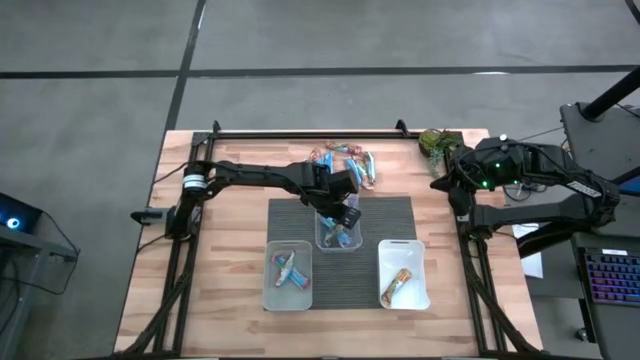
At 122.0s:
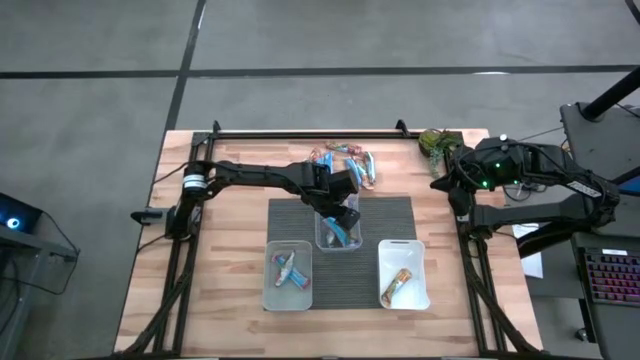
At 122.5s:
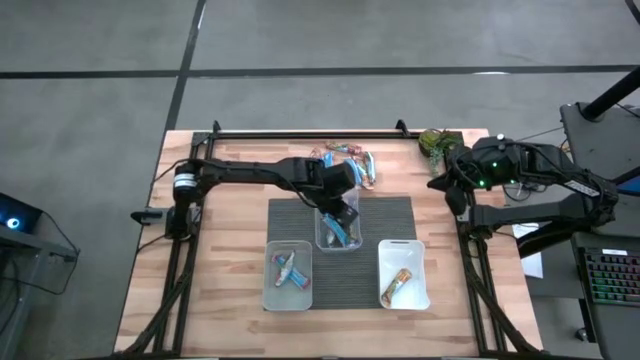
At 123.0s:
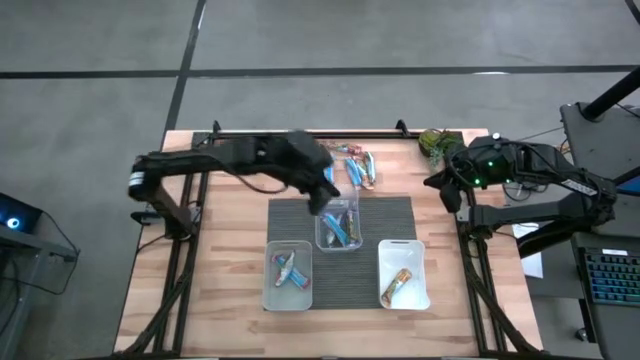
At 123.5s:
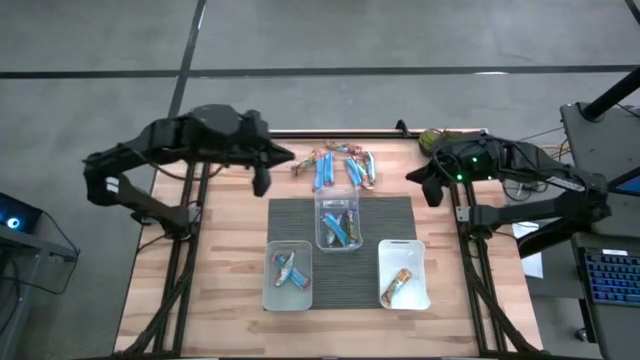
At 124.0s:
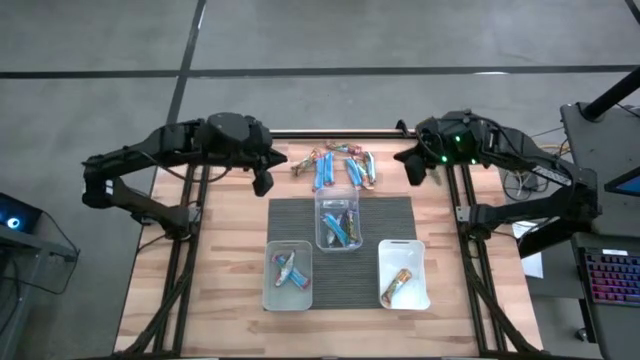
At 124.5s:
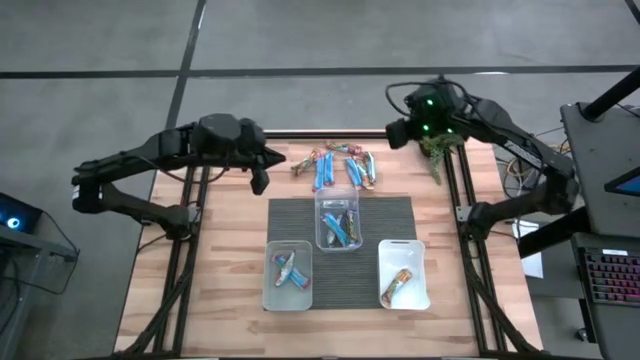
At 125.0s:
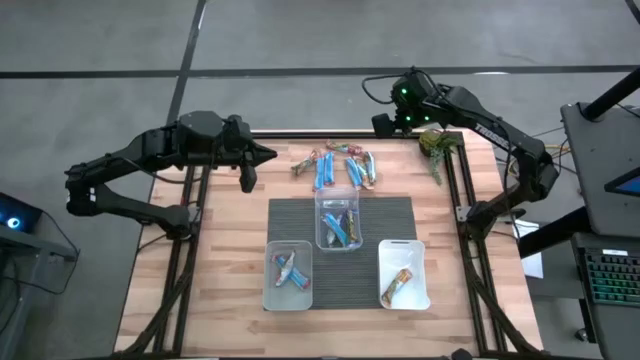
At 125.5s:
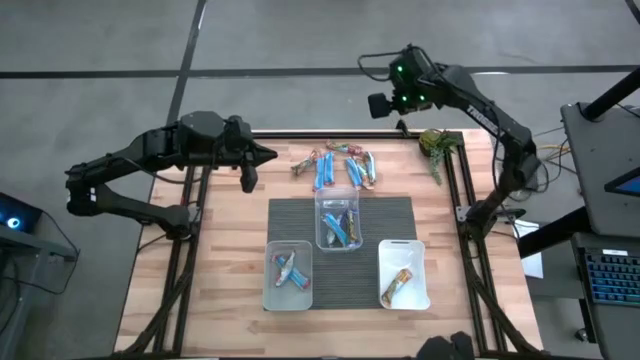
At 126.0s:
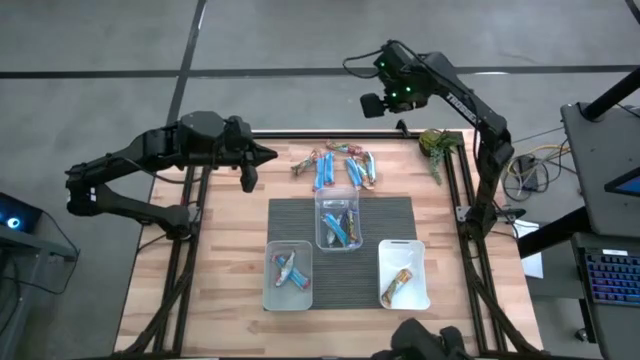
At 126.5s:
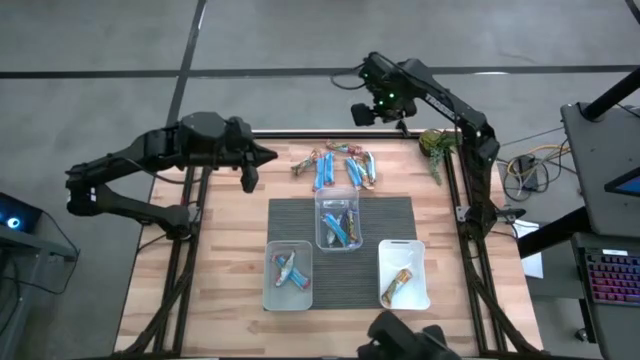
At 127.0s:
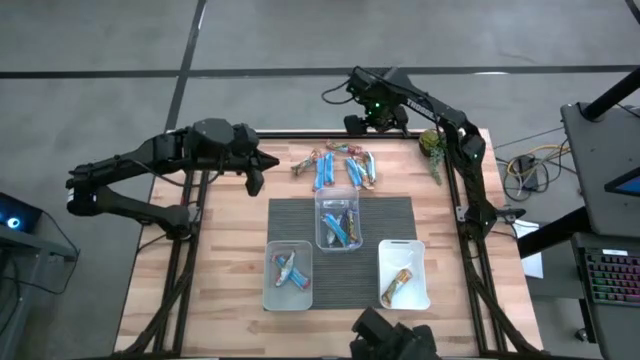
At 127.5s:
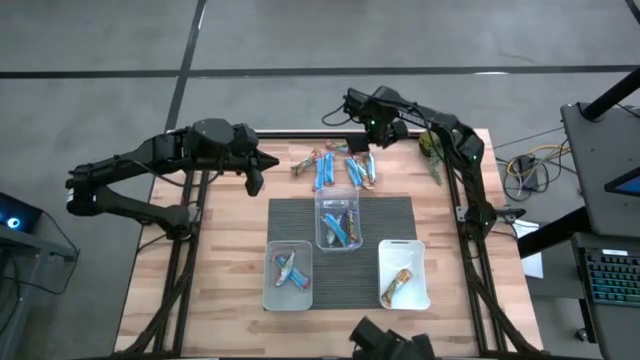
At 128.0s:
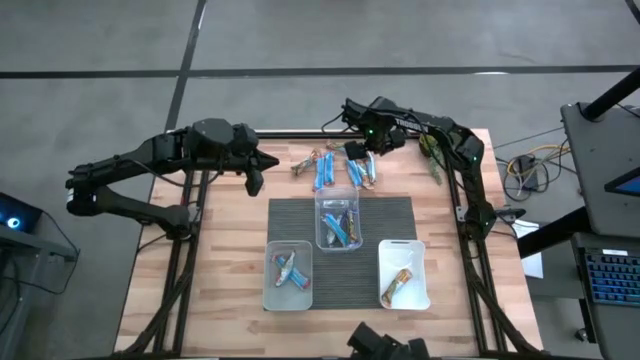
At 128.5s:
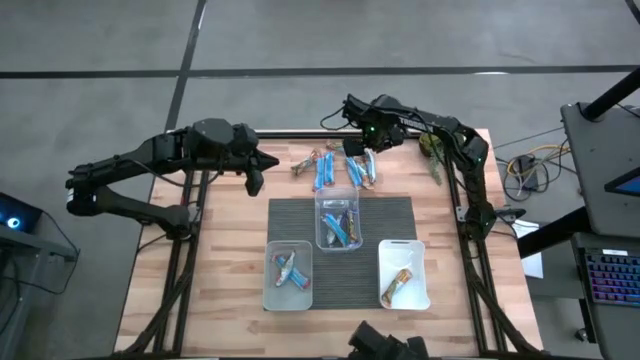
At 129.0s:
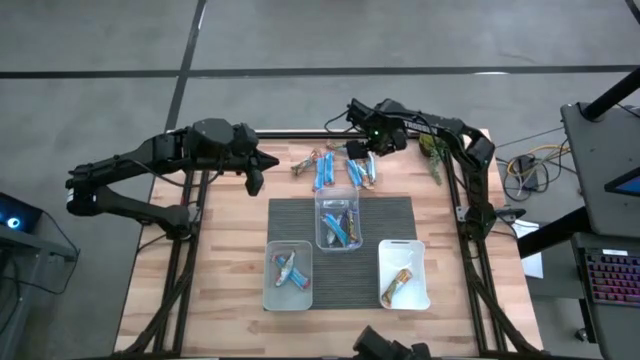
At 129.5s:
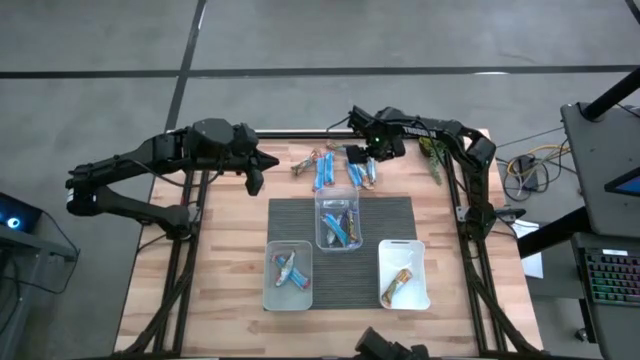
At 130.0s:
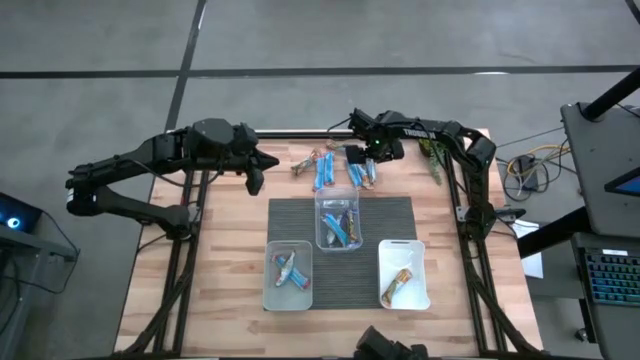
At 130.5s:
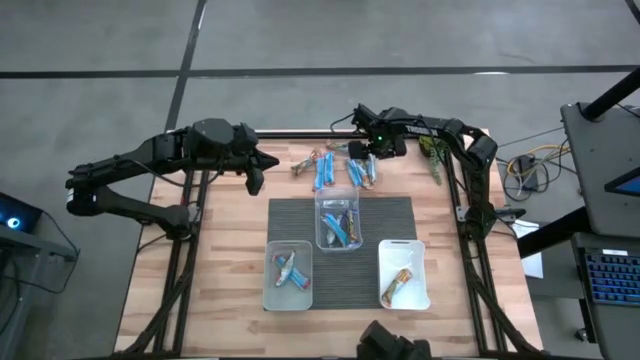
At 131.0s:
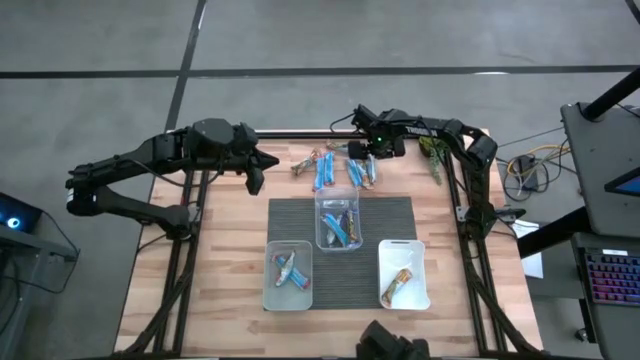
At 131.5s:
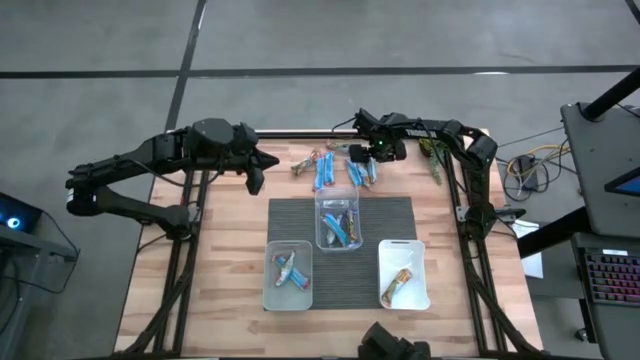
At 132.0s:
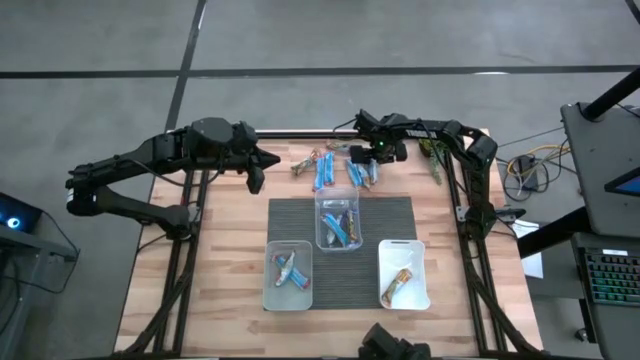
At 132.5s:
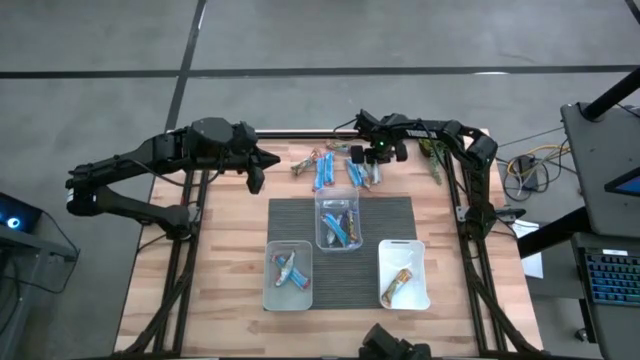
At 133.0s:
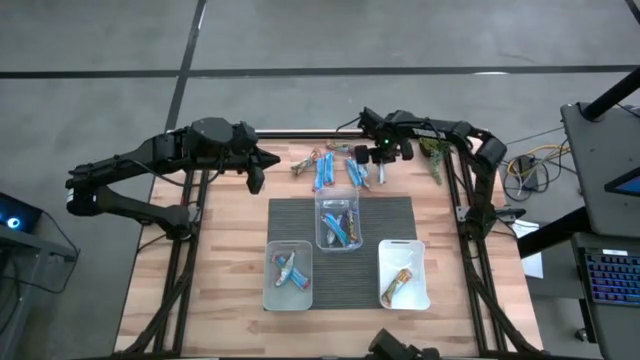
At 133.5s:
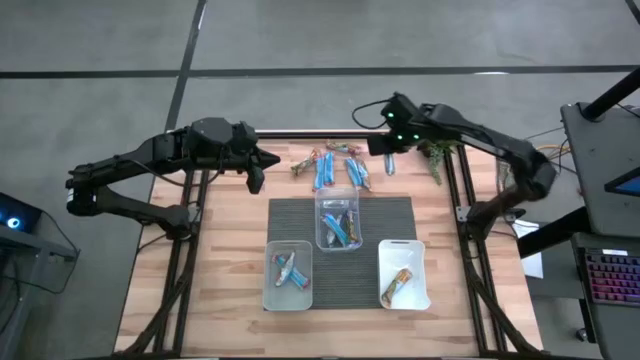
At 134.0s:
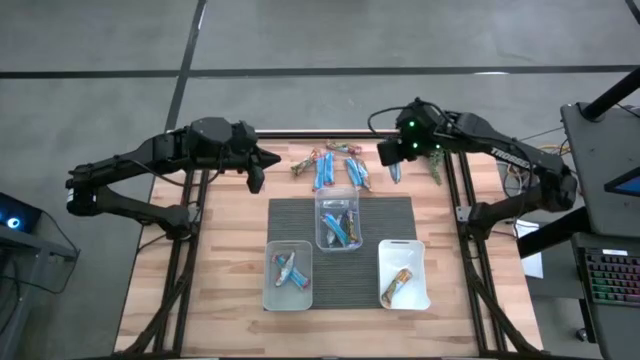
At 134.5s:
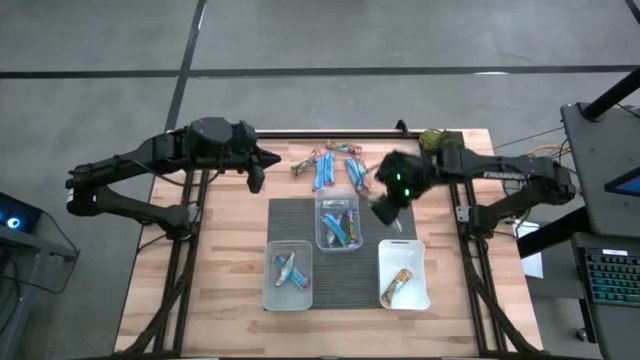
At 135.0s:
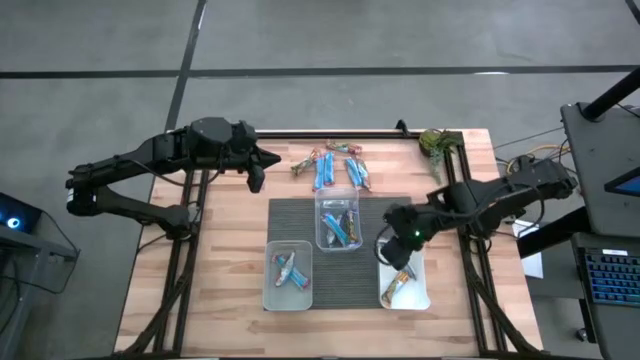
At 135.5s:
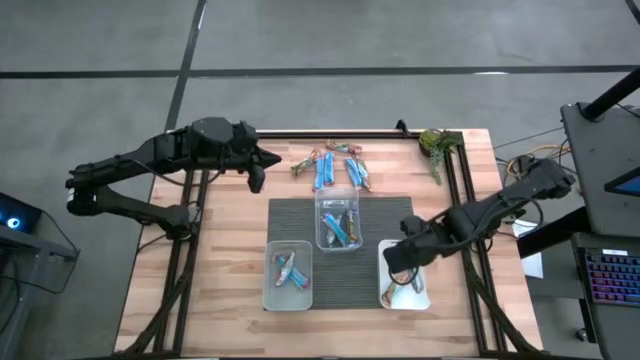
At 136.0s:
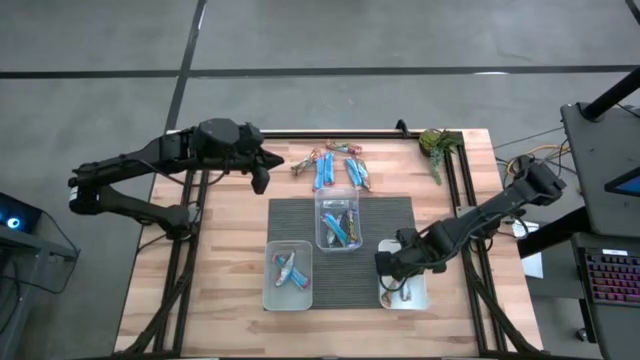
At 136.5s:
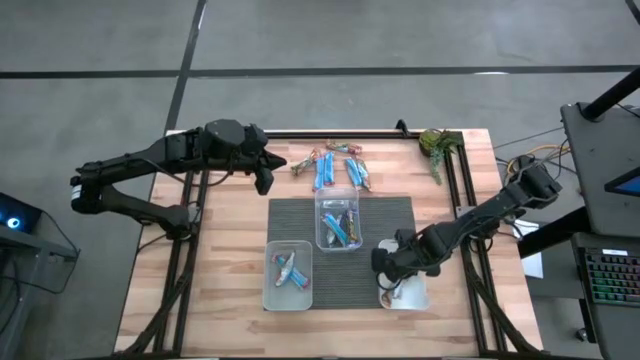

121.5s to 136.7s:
Task: Pick and place Granola Bars by type
Put the orange granola bar into the white bin

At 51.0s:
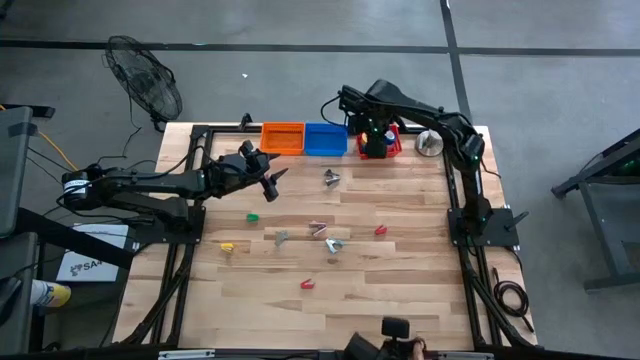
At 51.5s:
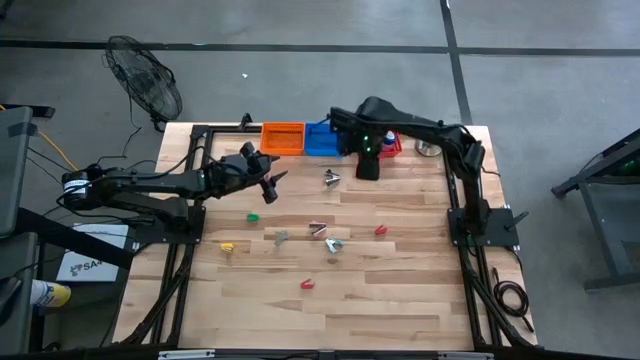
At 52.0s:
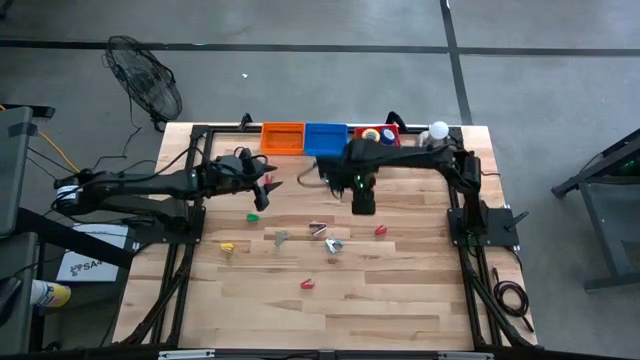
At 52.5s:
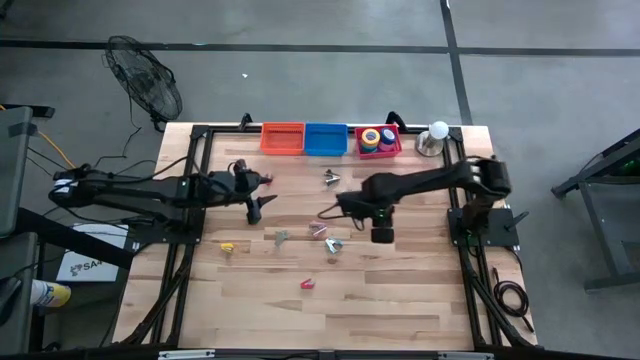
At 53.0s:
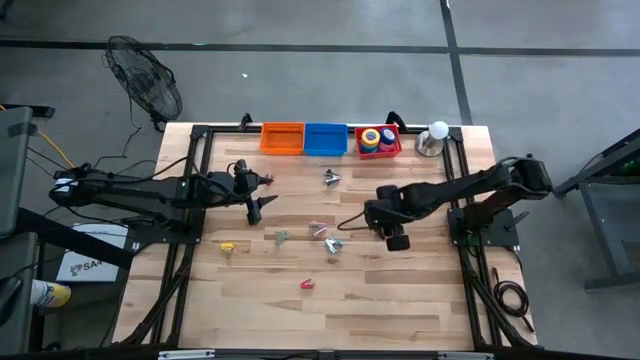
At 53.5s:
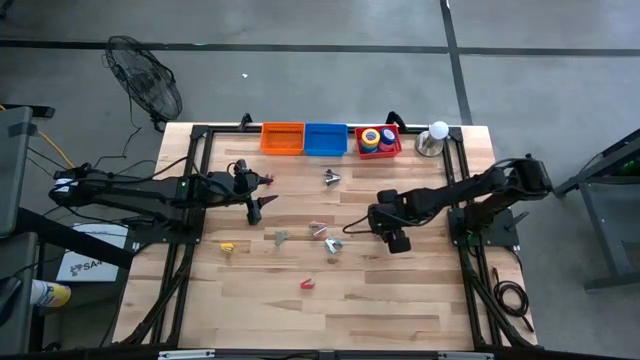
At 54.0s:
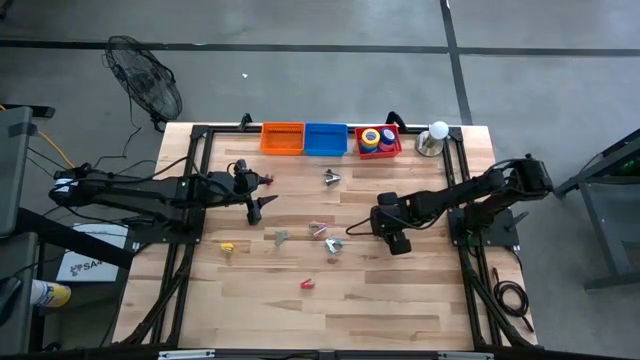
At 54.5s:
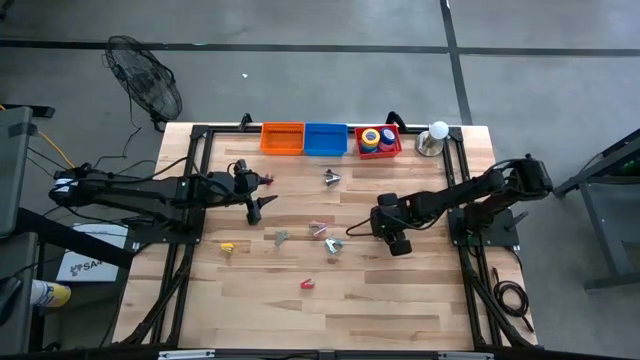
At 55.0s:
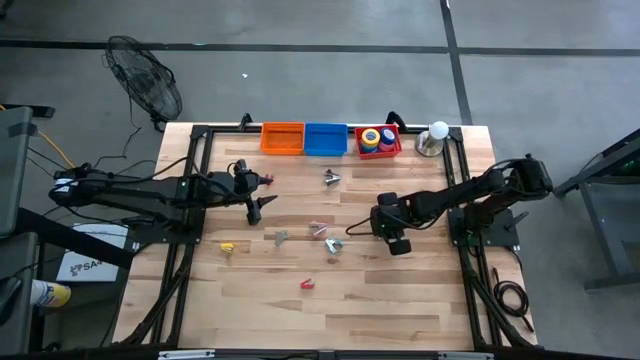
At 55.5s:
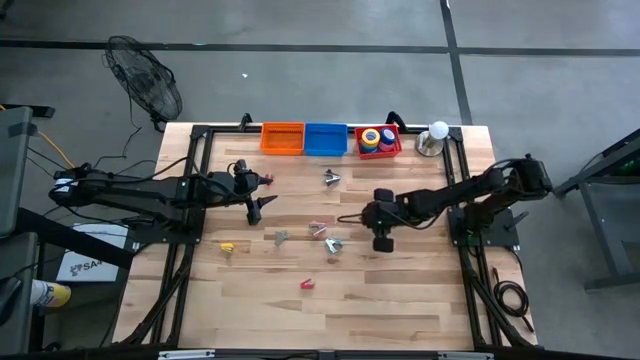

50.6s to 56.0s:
Task: Pick and place Stapler, Stapler remover, tape
Put the red stapler into the blue bin

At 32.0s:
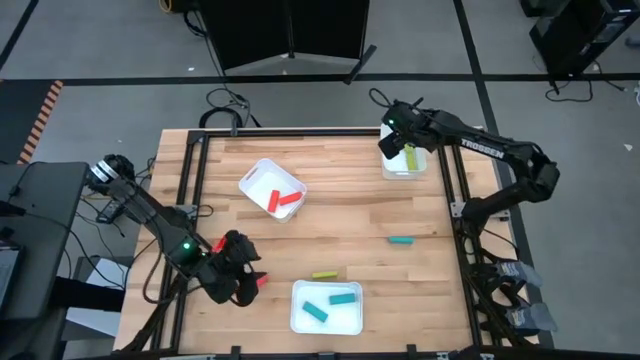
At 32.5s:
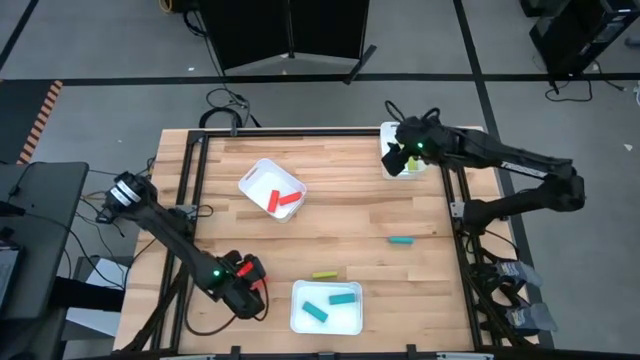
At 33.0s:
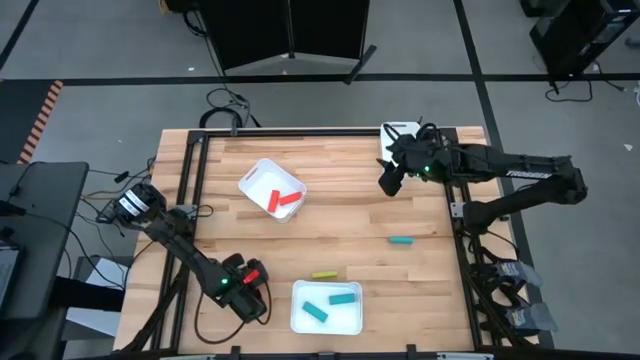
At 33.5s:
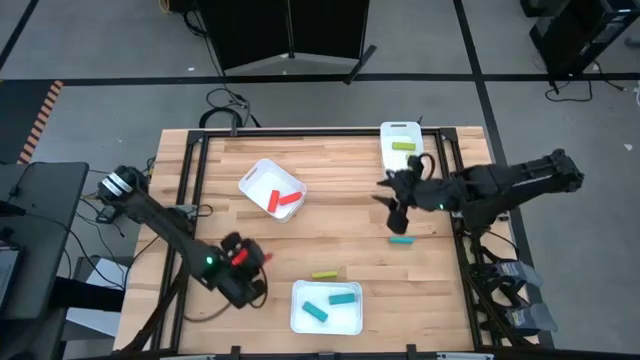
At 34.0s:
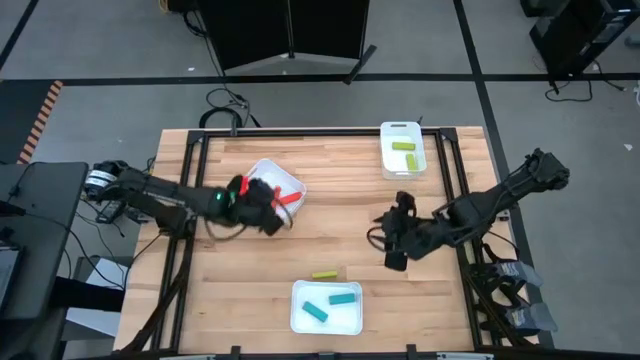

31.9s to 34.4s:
Task: Sort blocks
Put the orange block into the top left bin
